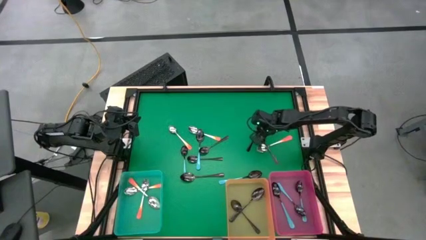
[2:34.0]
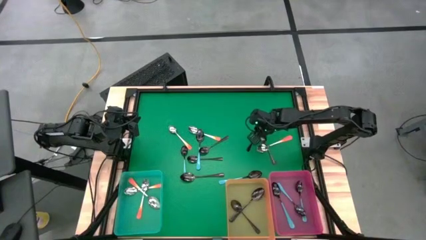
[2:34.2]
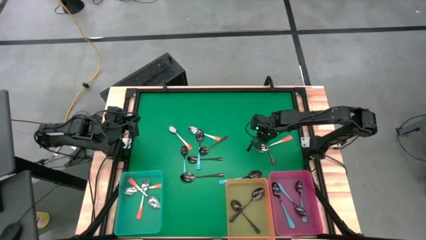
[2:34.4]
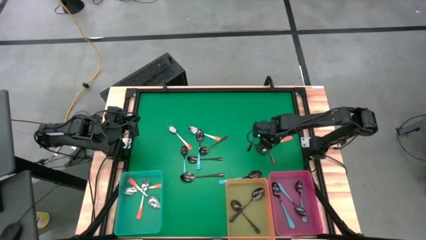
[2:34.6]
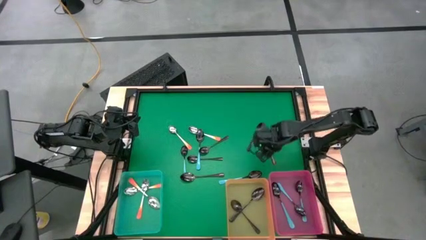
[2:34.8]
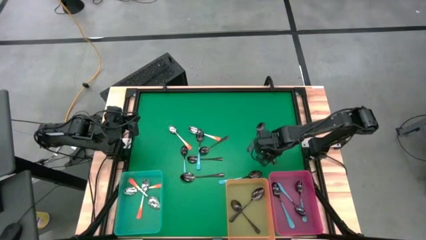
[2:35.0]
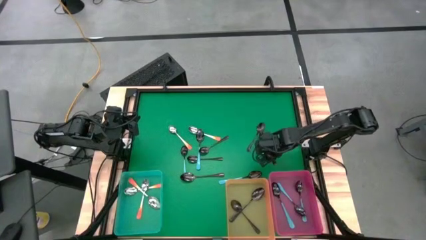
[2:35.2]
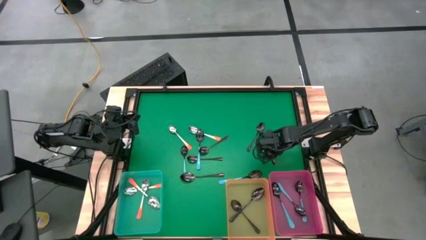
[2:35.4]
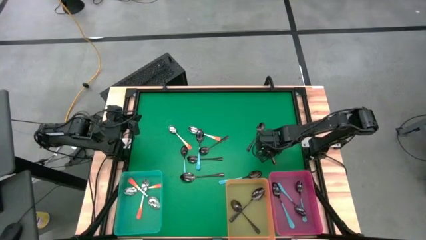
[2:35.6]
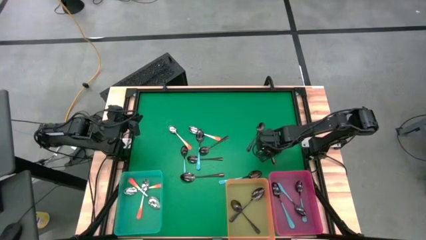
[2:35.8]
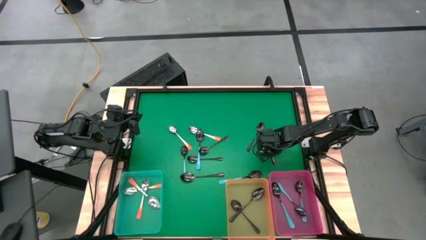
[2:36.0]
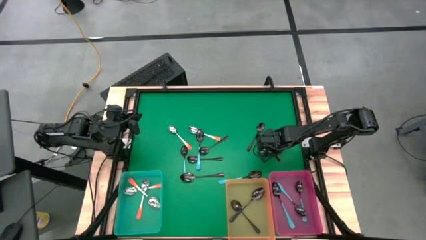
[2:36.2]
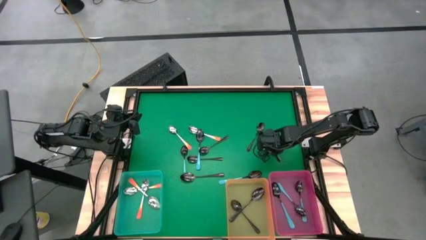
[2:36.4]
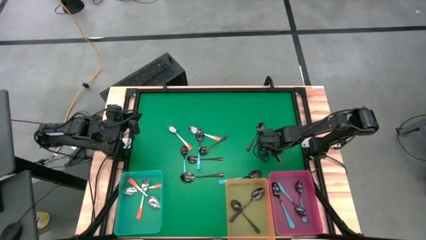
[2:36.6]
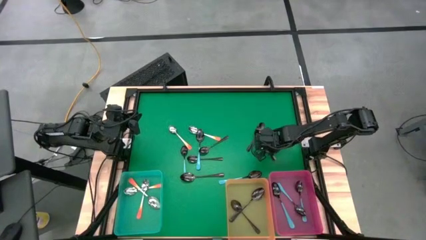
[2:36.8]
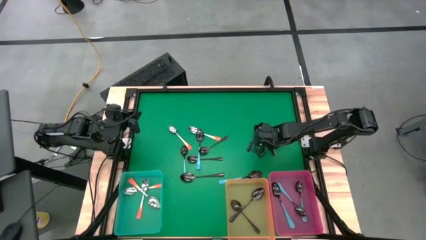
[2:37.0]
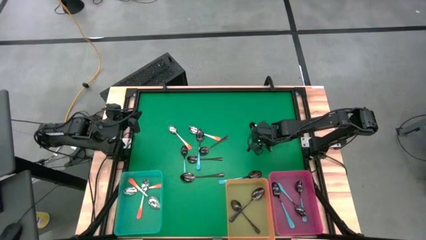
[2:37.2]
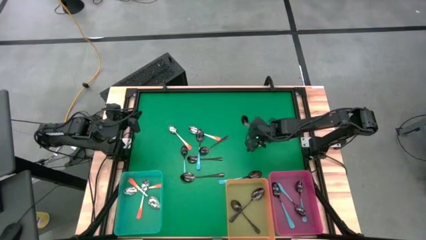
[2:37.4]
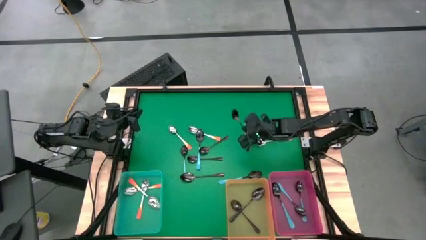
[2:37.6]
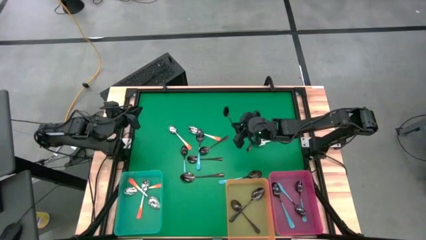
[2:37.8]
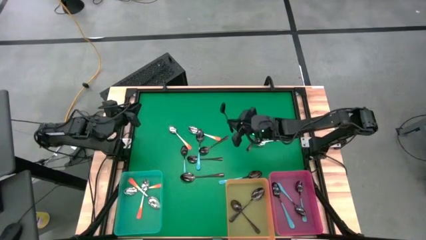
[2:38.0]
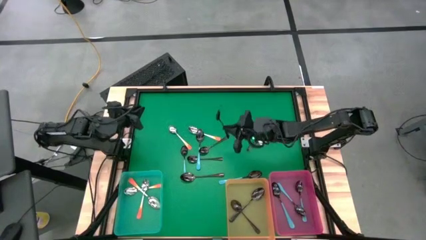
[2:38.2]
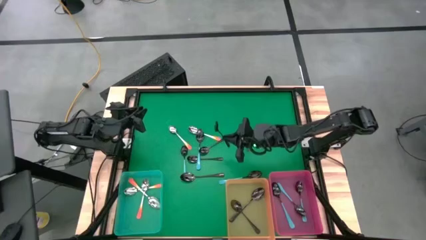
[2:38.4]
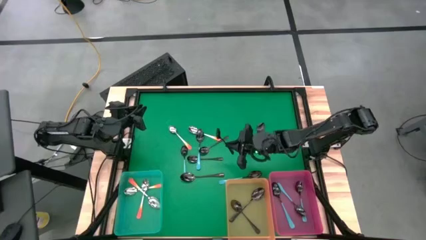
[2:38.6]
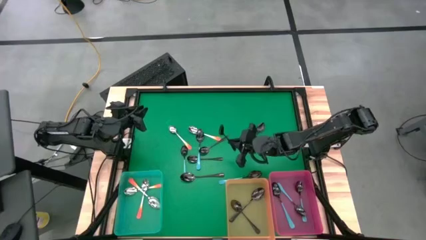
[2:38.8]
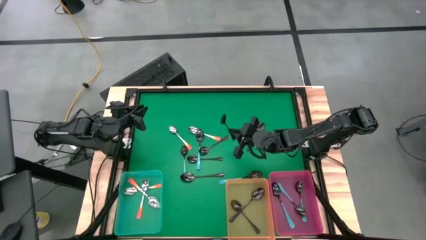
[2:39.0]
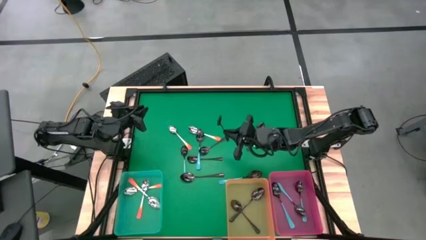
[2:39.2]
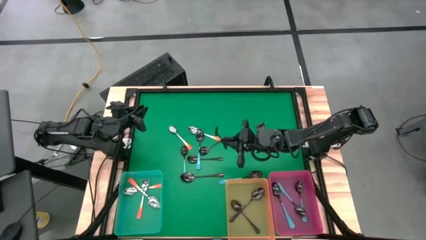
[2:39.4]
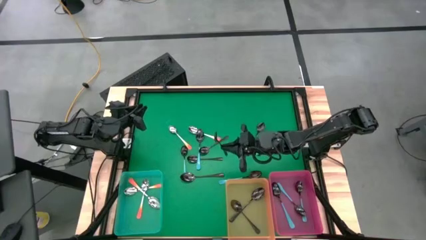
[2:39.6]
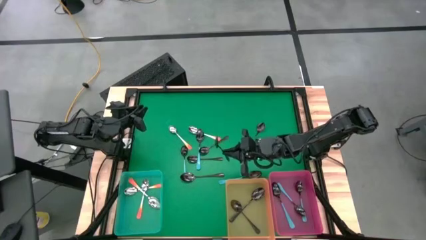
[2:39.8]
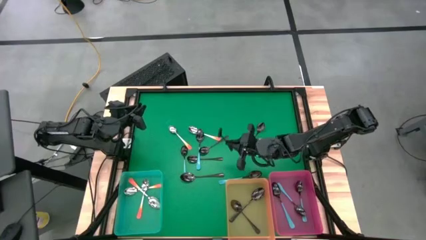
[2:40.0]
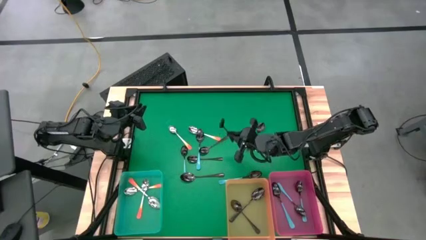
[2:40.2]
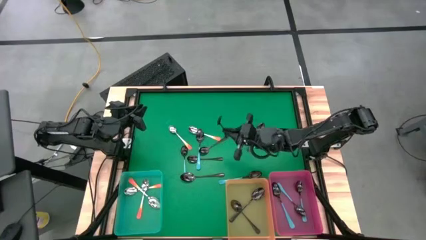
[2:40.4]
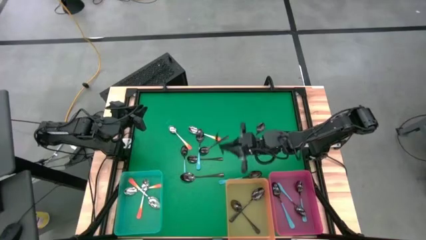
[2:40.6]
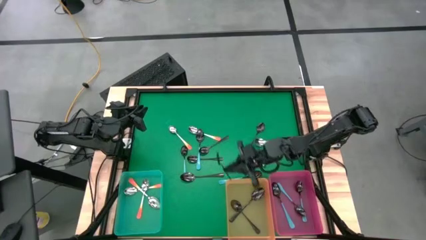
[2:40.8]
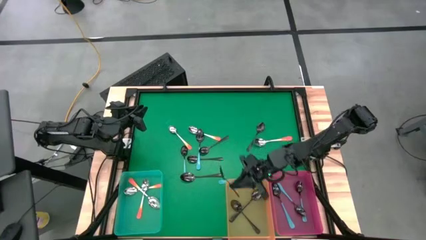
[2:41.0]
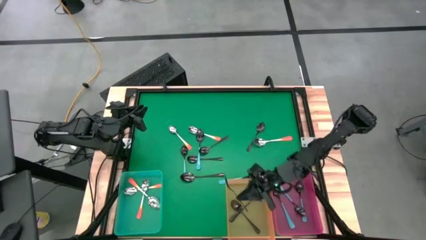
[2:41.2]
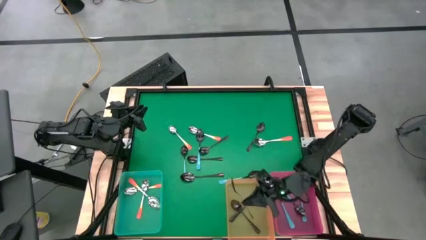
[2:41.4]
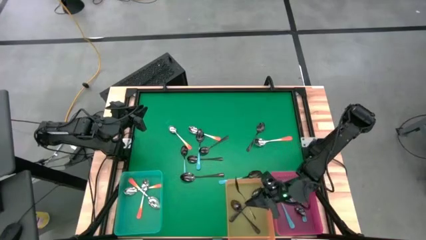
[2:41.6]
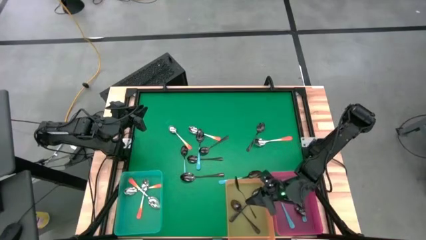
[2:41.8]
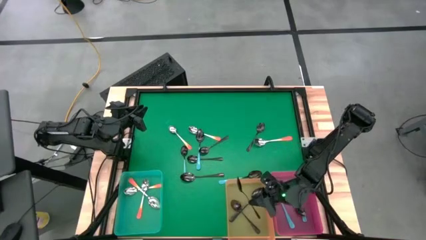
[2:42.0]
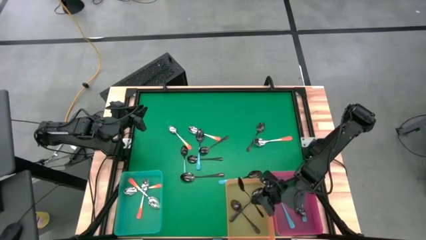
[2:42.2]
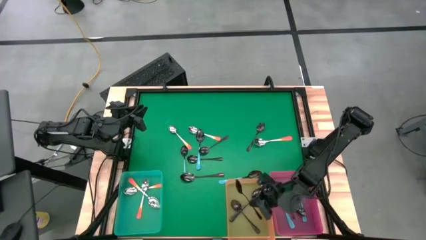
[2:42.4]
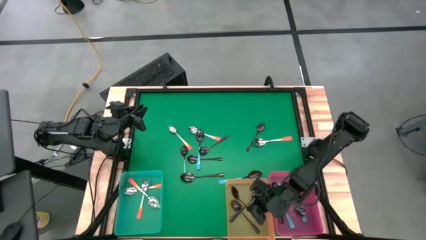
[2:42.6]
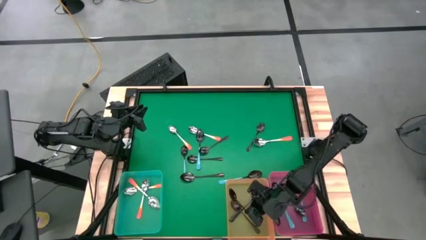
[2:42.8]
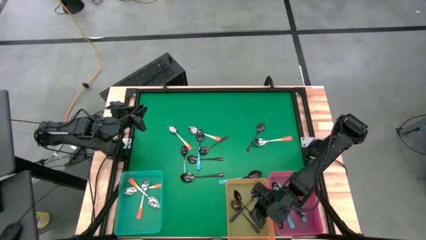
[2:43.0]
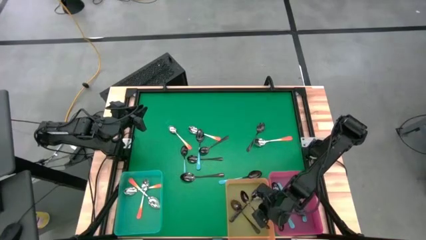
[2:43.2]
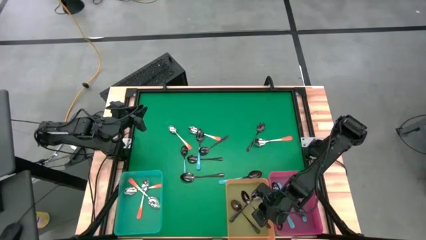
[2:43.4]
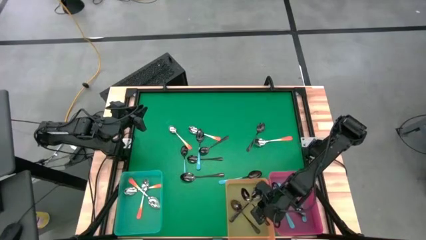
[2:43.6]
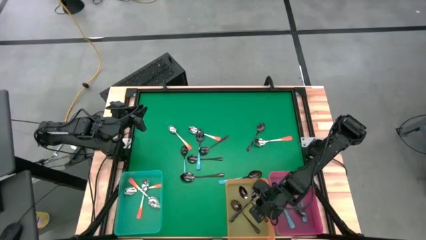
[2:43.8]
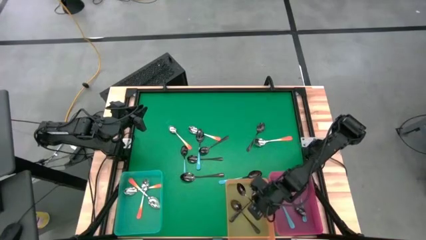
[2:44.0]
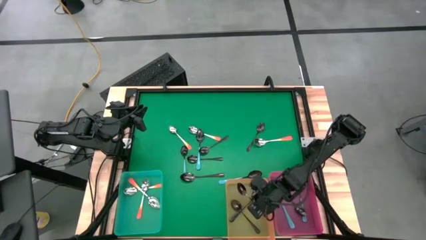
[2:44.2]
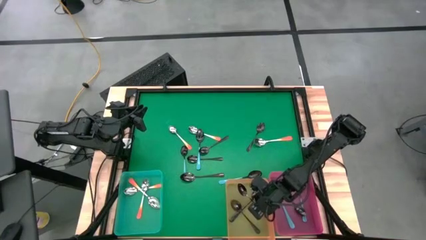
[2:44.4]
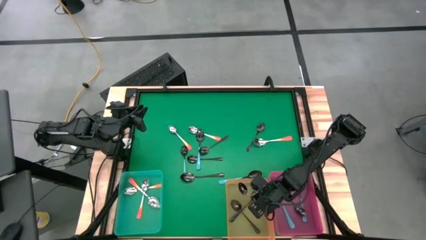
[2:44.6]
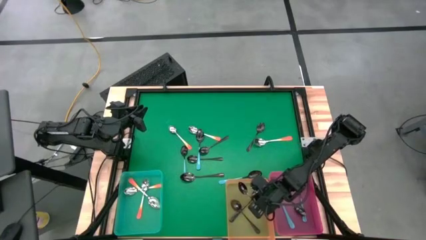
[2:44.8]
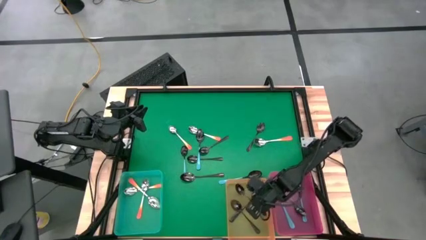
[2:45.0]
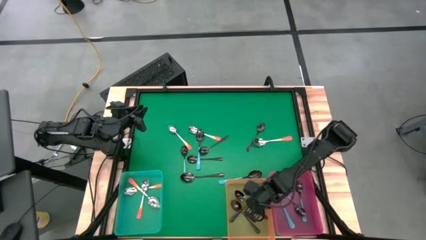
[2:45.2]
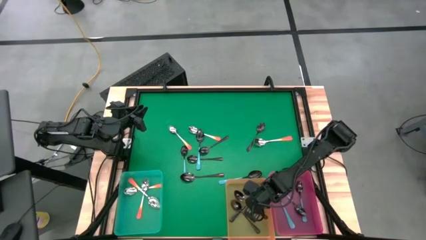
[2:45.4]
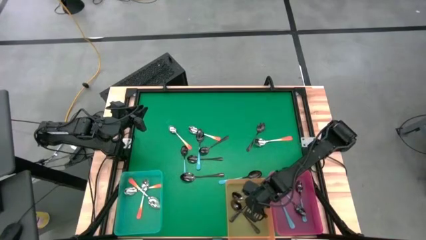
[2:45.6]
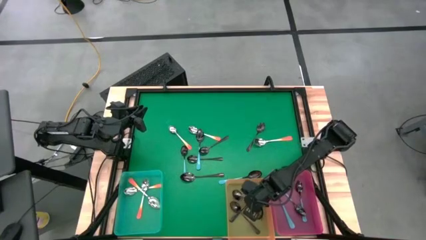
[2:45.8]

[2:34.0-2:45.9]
Task: Sort silverware by color (type)
Put the black spoon into the orange bin
